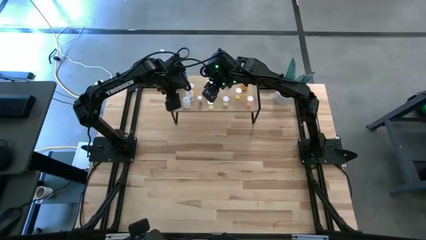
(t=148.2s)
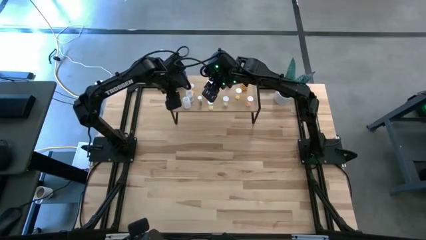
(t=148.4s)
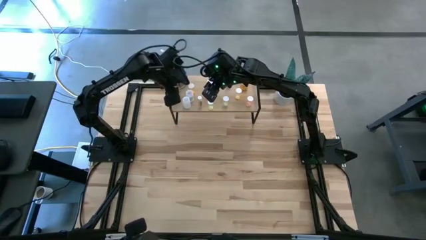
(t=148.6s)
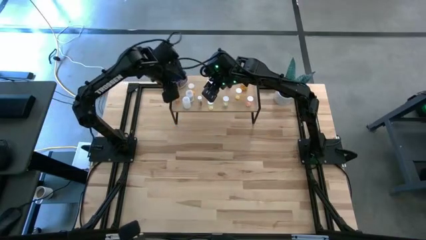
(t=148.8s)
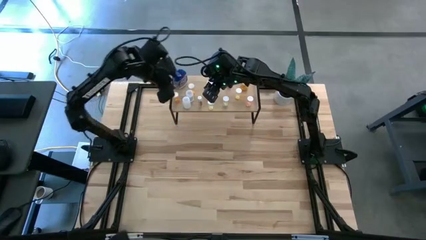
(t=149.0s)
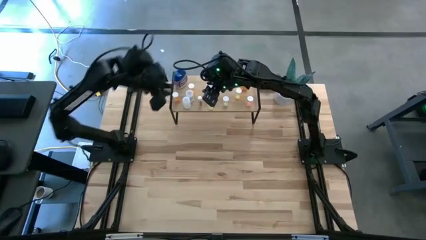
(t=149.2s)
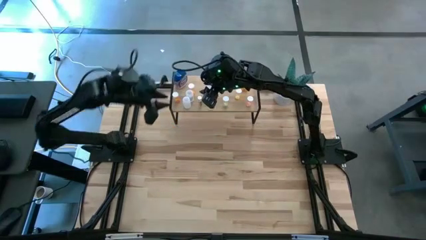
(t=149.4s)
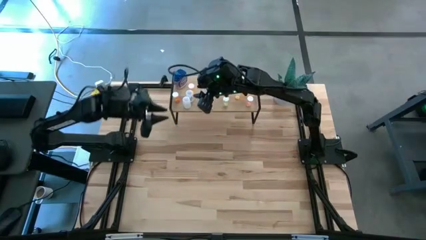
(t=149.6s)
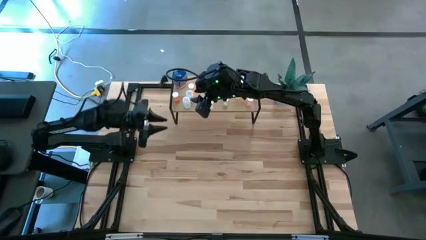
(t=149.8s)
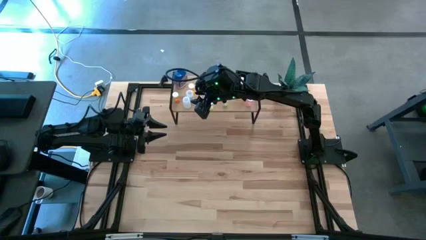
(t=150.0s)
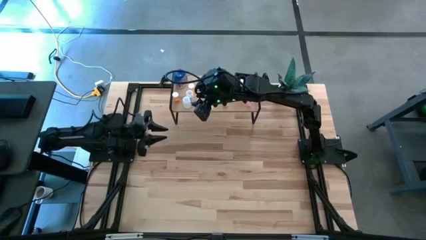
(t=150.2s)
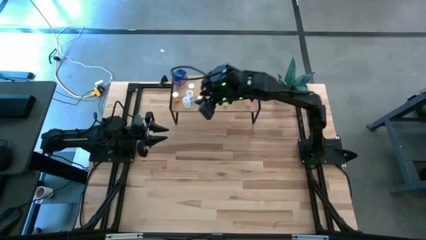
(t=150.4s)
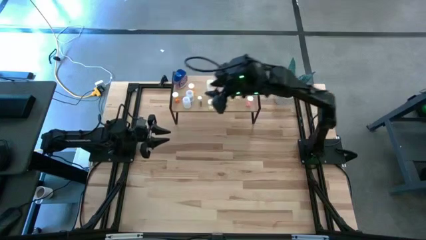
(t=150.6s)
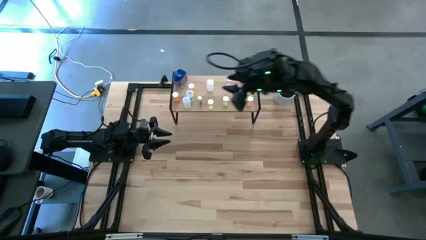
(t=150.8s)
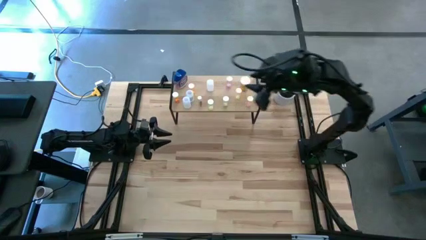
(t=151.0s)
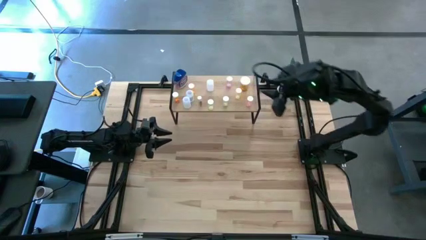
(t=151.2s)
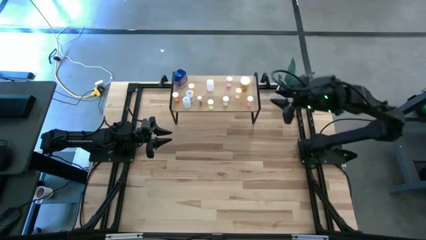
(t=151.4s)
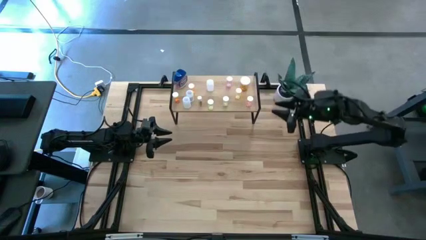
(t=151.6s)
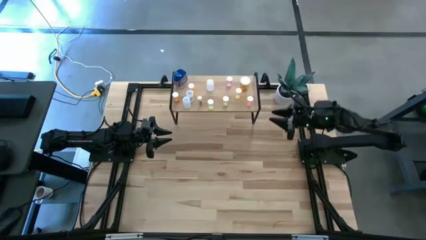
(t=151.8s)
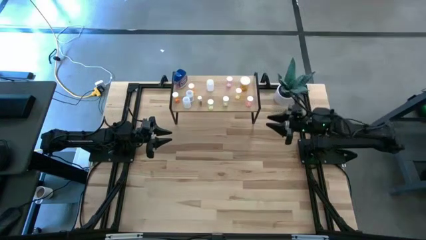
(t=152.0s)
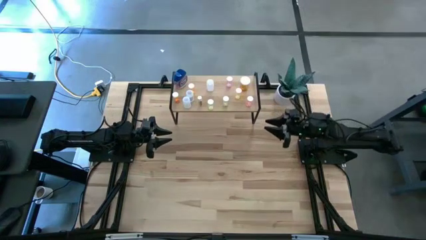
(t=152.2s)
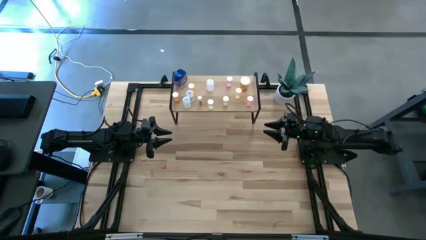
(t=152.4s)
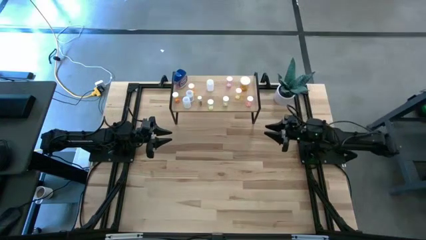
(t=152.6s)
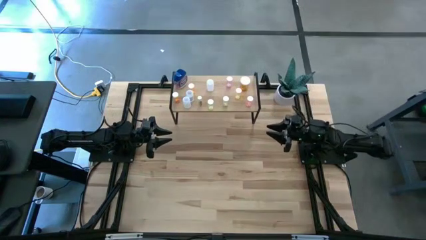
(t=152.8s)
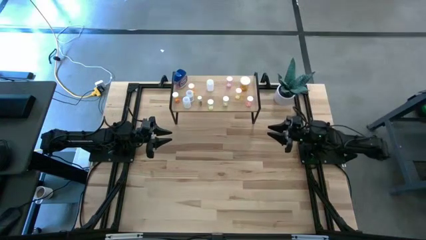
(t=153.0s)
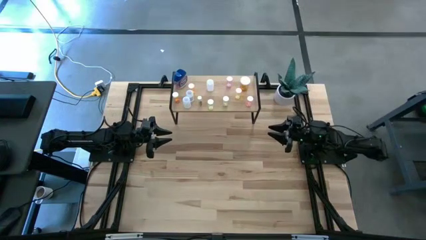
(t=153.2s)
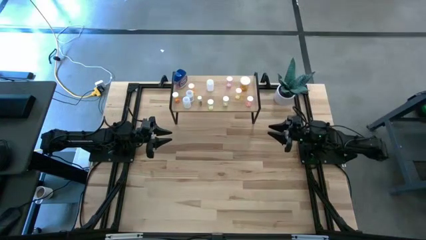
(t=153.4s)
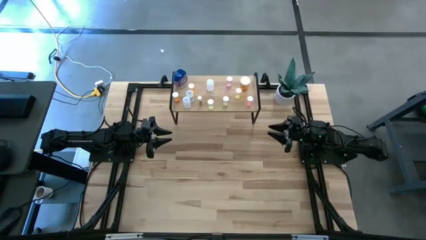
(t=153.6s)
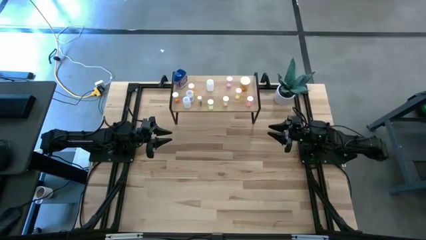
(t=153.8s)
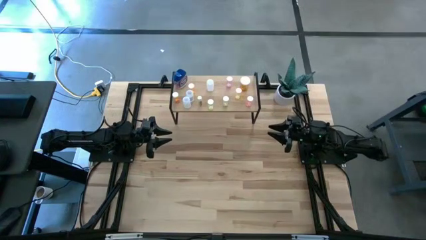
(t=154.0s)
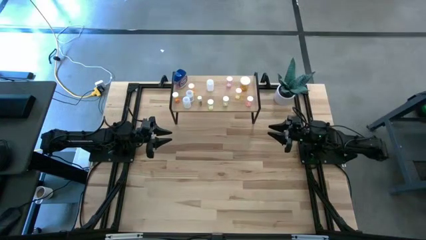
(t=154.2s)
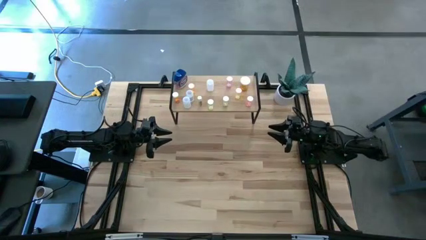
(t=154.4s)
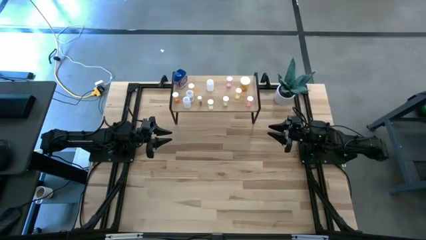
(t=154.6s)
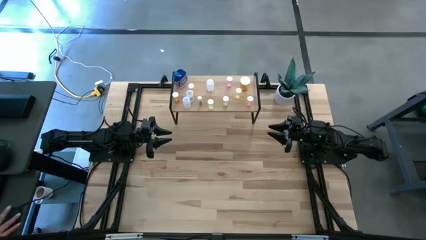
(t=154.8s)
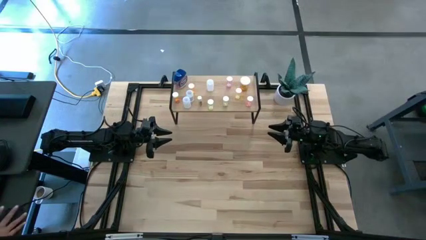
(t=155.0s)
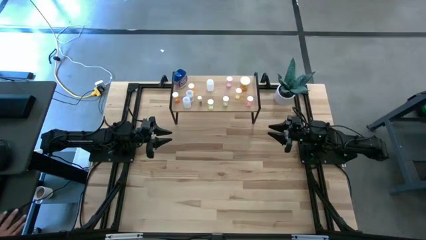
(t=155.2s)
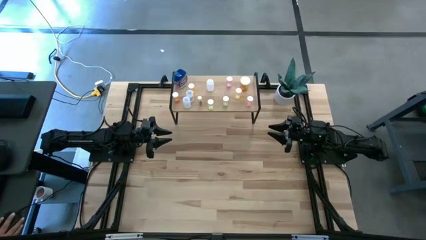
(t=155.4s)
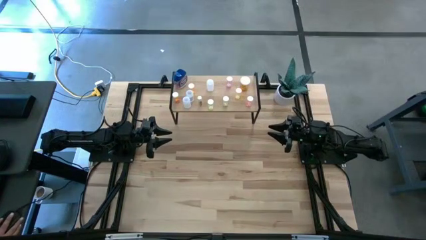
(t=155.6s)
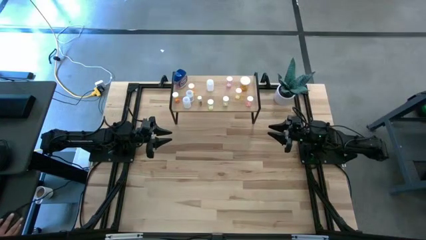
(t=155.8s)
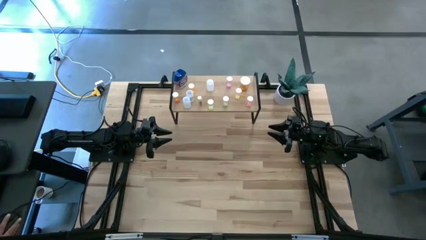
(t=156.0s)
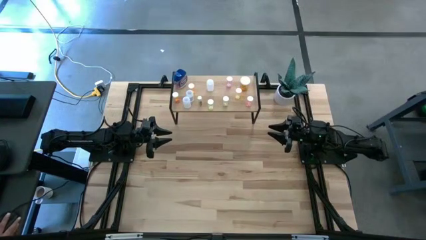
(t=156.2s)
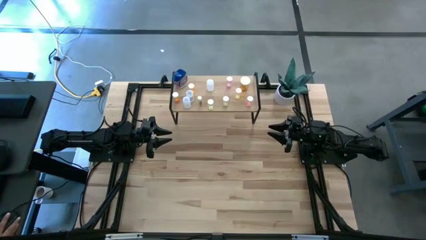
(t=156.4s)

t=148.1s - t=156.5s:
Task: Pick and place medicine bottles onto shelf by color
Return to Home Position

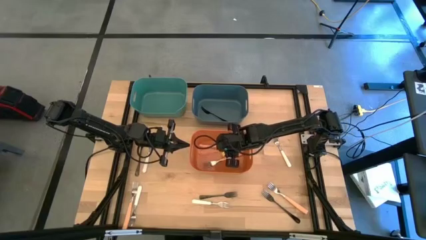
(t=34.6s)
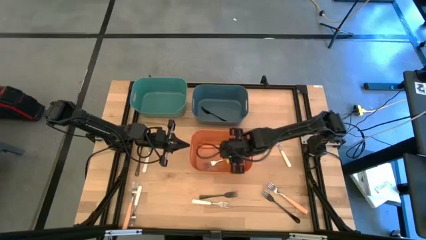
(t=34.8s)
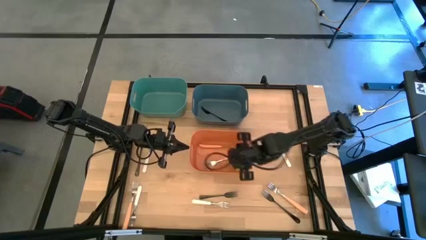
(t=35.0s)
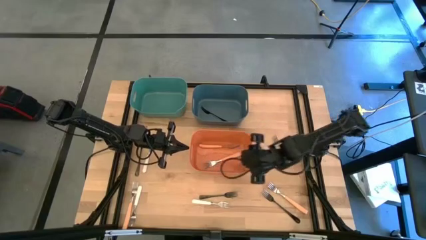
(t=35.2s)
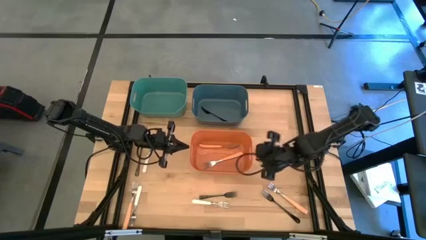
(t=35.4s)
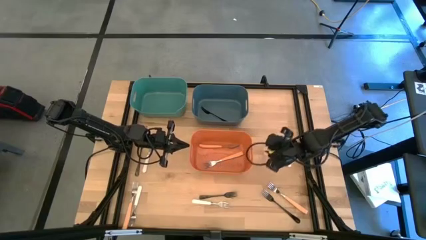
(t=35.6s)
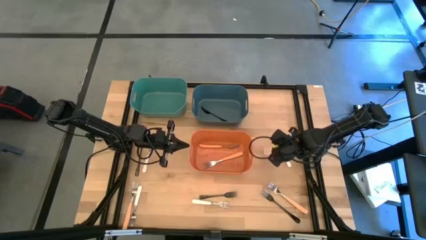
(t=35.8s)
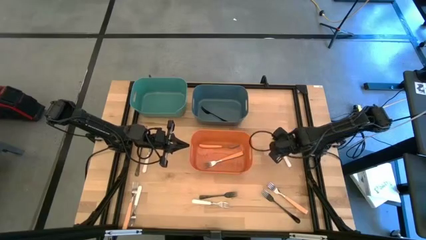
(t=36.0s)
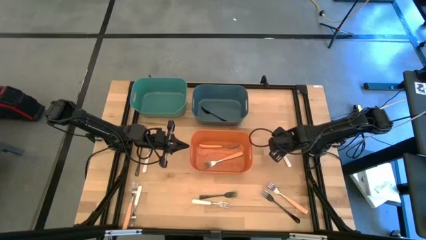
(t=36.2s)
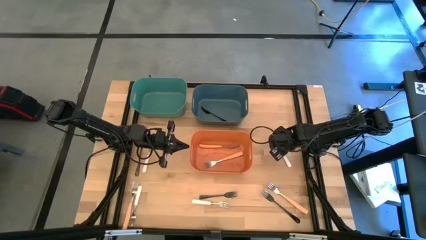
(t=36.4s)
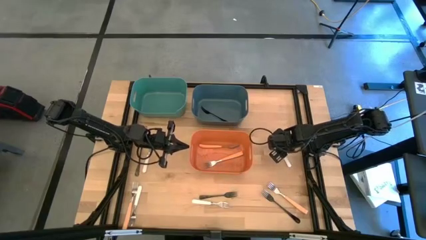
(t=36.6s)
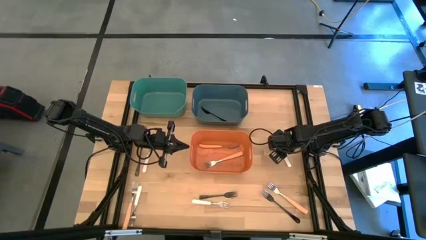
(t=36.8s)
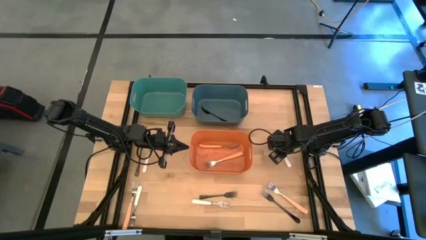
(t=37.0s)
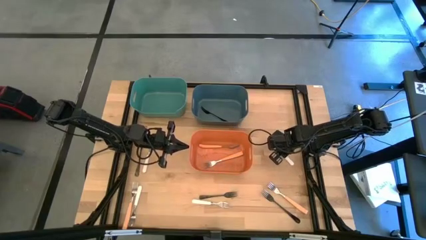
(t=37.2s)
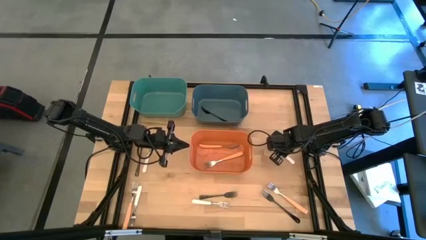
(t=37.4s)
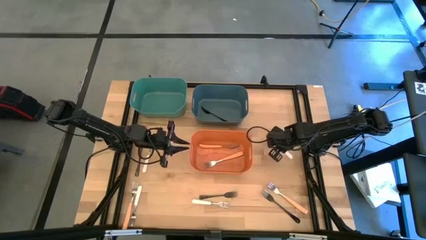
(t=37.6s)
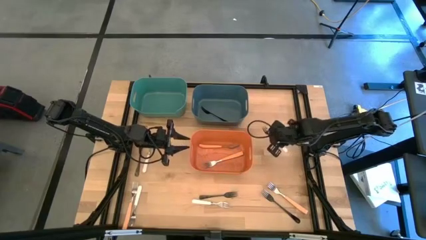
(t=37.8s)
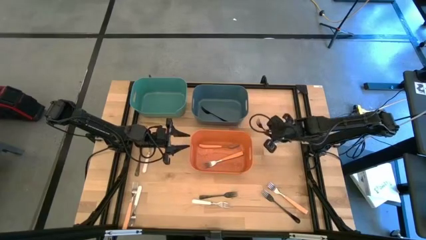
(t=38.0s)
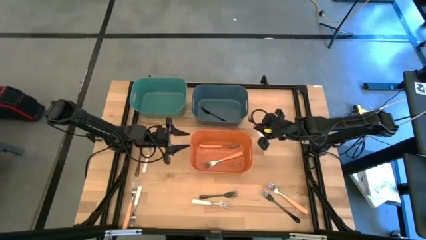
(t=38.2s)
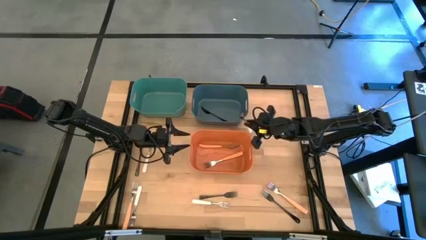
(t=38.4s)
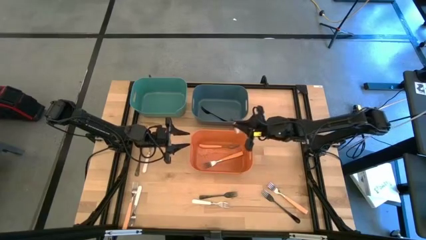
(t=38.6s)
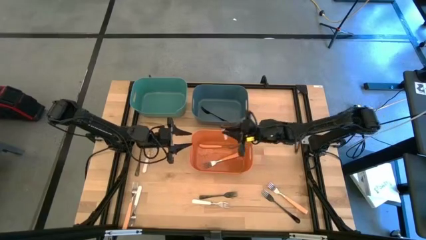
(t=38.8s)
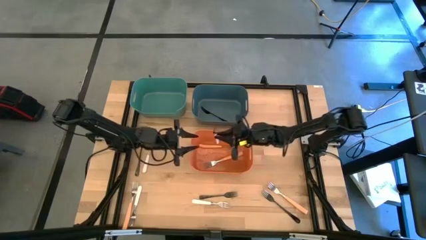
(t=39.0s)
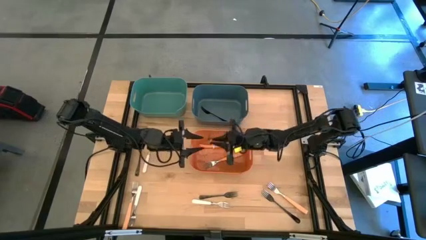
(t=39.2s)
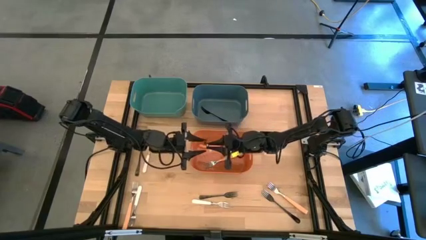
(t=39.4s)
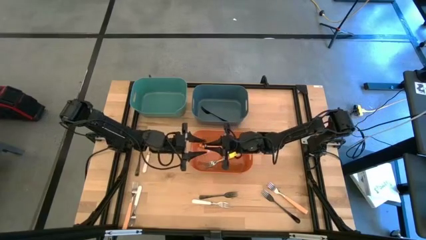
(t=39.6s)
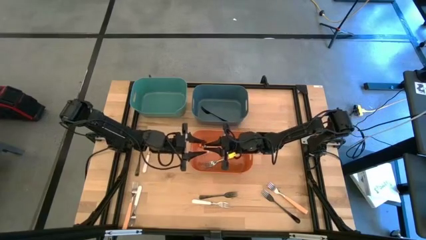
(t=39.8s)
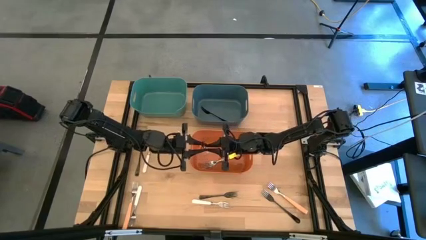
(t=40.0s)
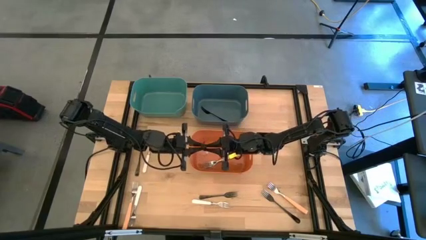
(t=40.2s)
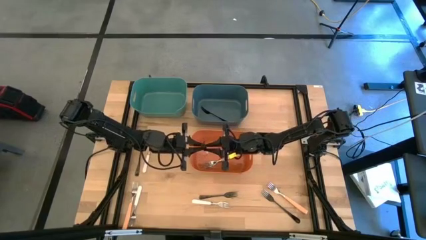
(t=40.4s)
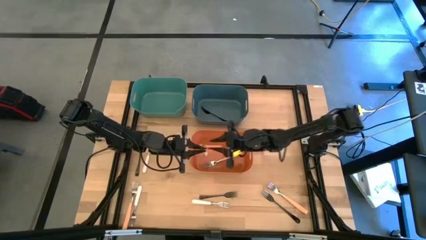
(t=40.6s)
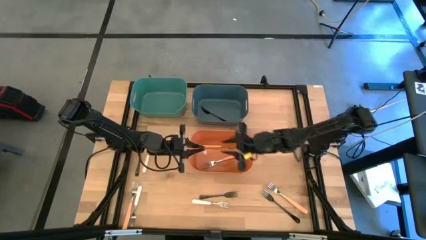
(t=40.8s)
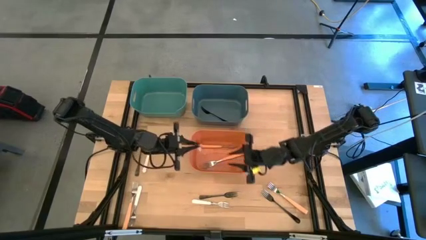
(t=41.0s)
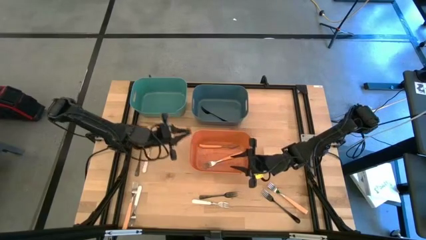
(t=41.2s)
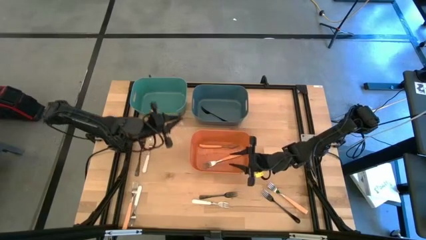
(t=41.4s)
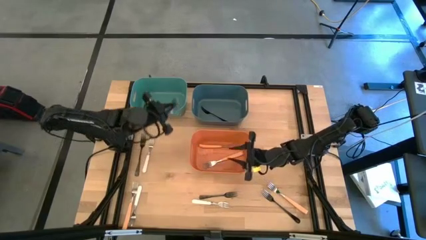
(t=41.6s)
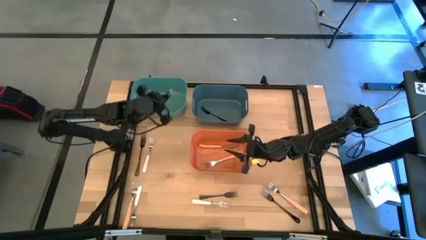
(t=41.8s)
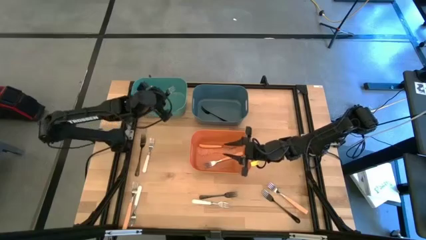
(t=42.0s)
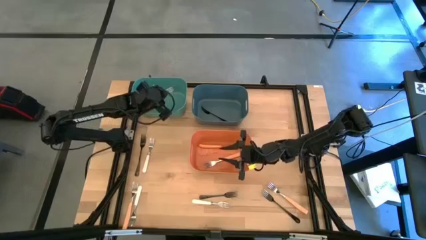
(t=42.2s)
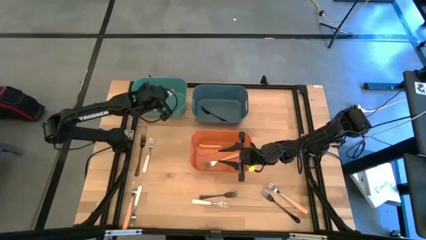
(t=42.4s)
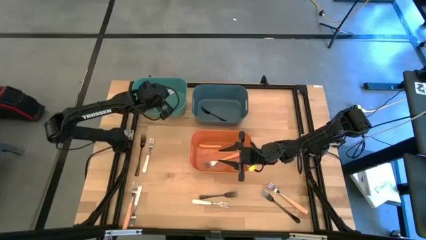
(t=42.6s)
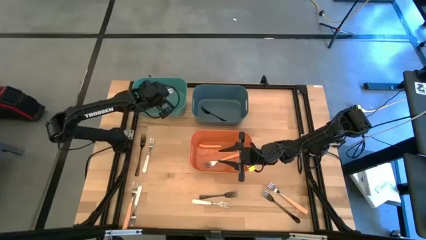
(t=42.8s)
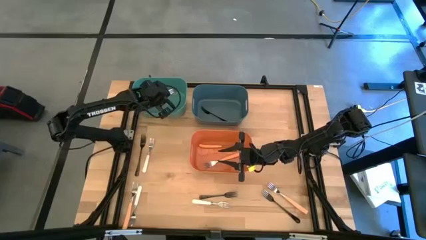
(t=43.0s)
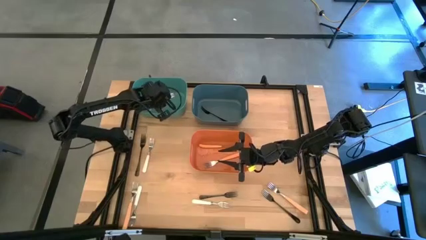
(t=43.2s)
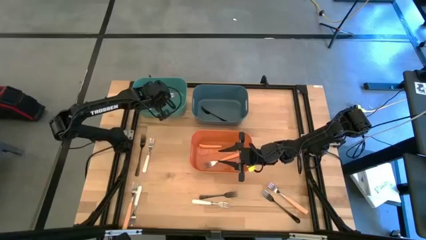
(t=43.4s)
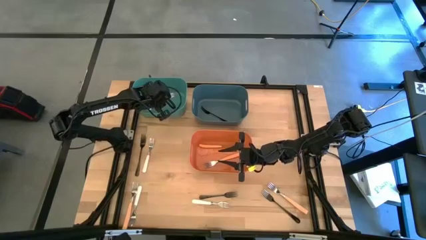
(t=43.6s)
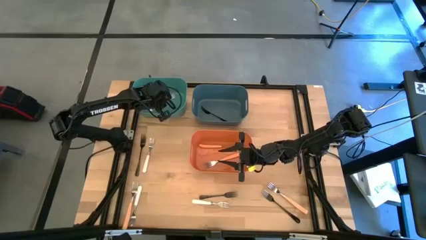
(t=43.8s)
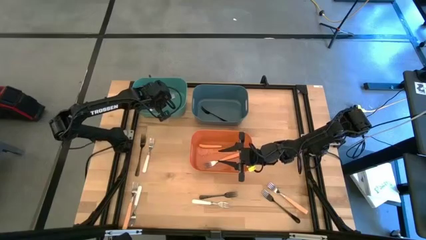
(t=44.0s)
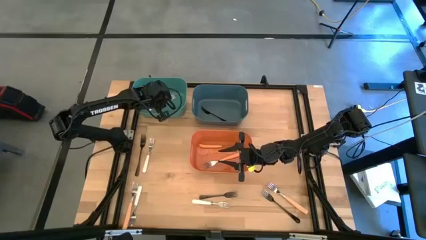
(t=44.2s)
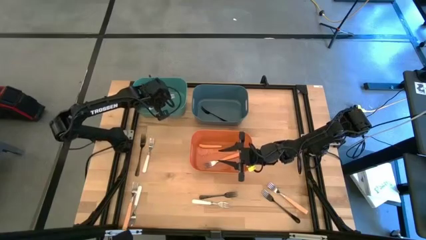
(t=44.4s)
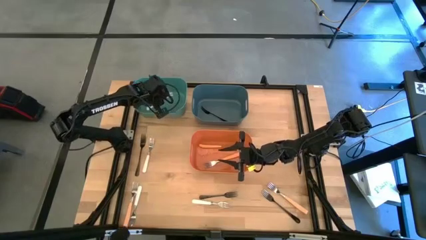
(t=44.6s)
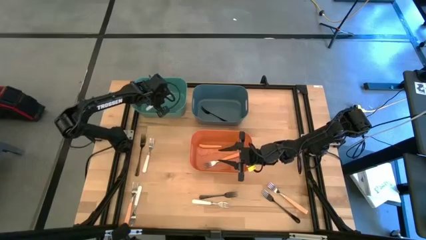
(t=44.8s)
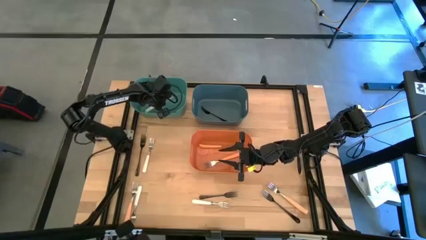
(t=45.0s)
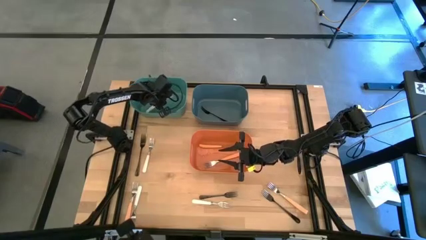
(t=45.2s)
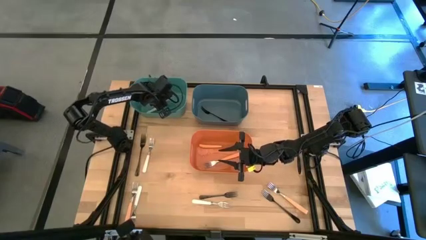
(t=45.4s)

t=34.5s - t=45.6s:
Task: Sort silverware by color (type)
Put the white fork into the green bin
